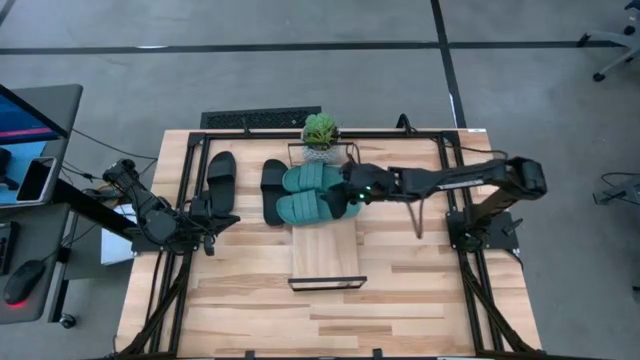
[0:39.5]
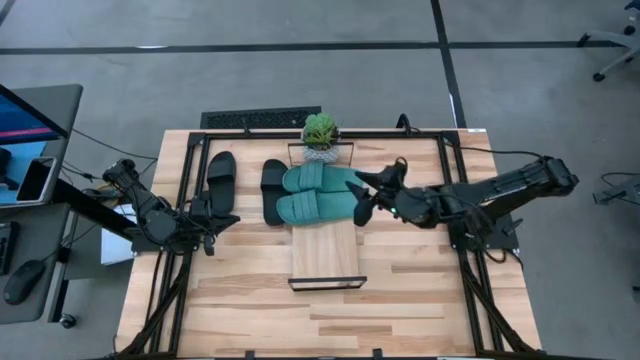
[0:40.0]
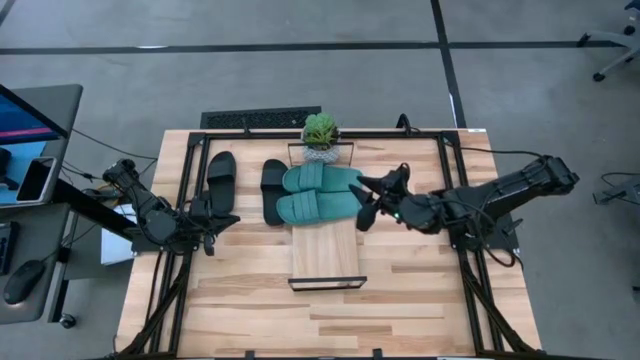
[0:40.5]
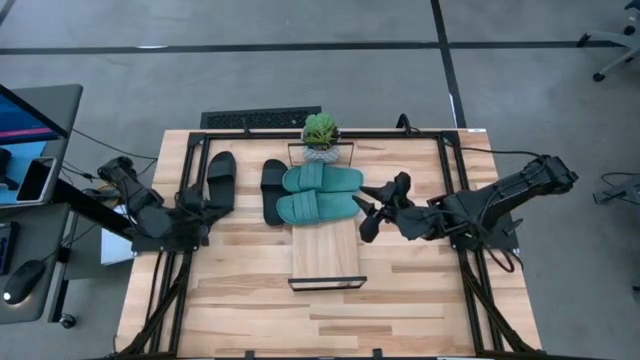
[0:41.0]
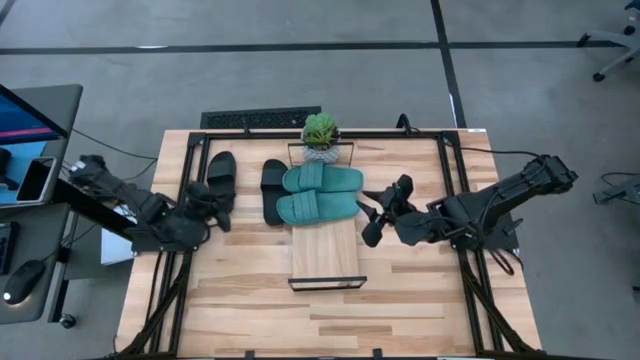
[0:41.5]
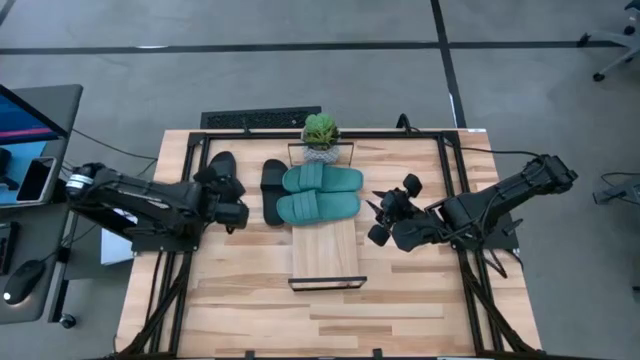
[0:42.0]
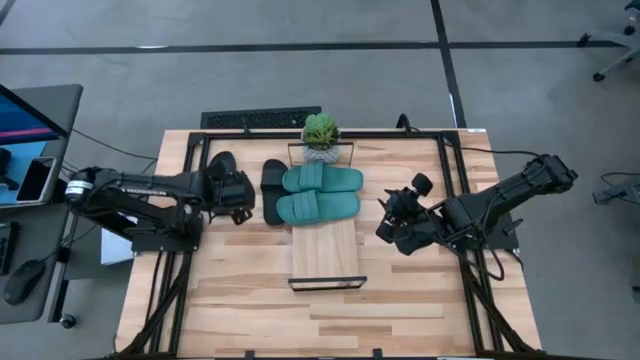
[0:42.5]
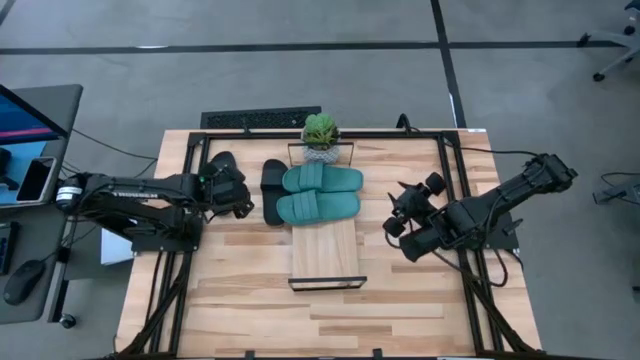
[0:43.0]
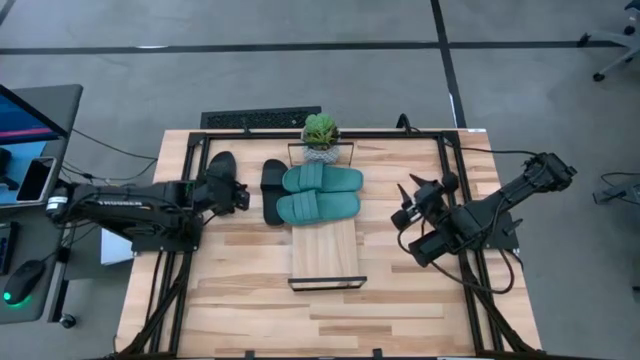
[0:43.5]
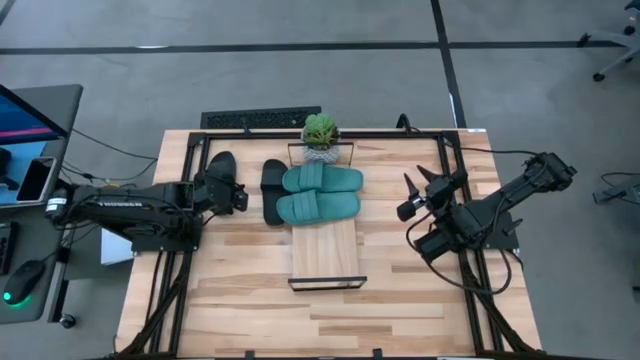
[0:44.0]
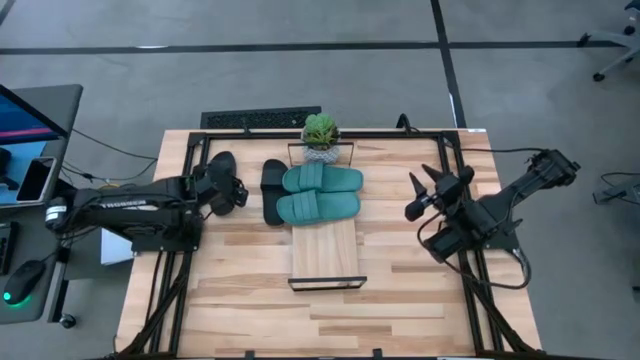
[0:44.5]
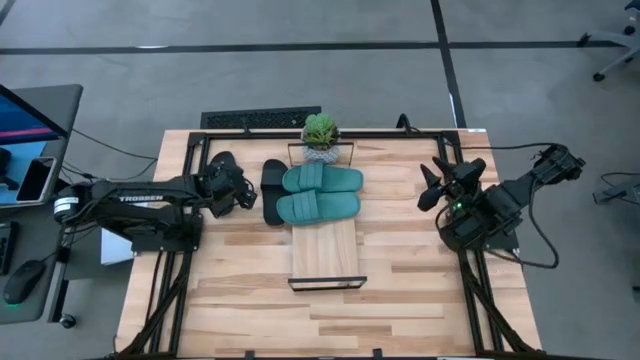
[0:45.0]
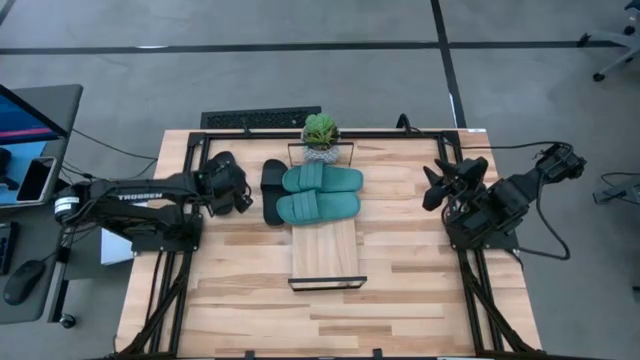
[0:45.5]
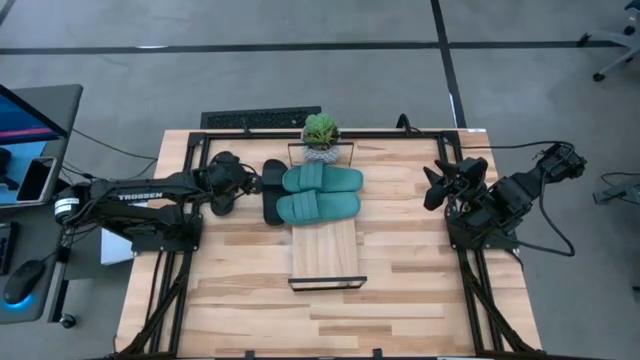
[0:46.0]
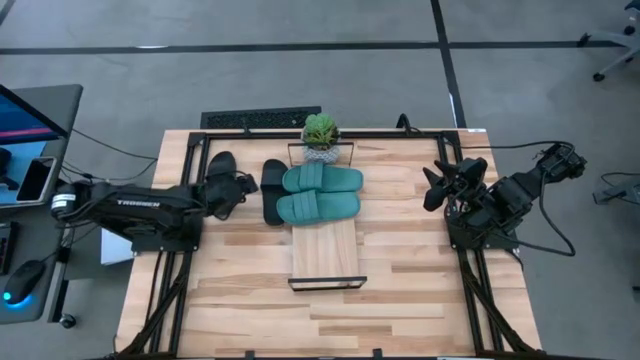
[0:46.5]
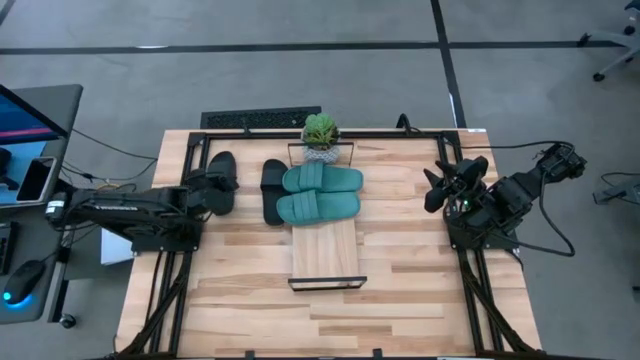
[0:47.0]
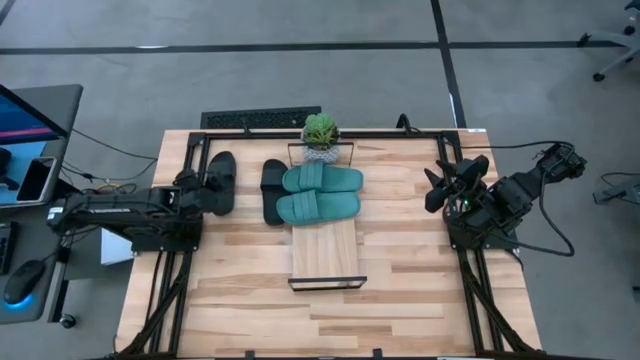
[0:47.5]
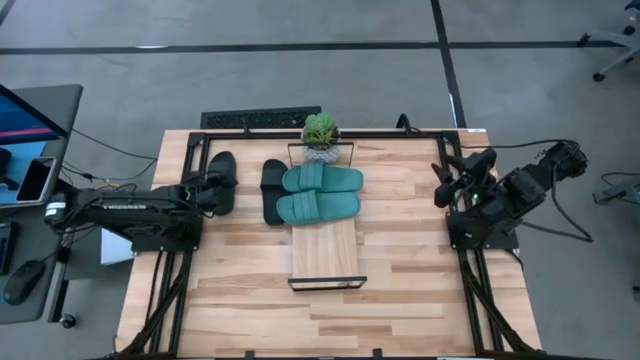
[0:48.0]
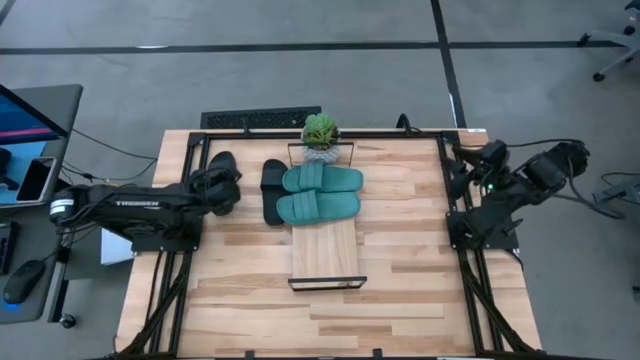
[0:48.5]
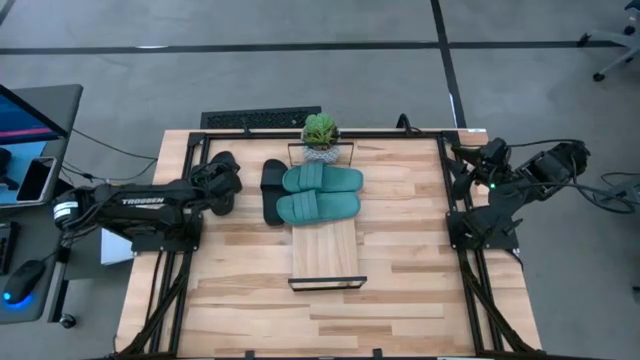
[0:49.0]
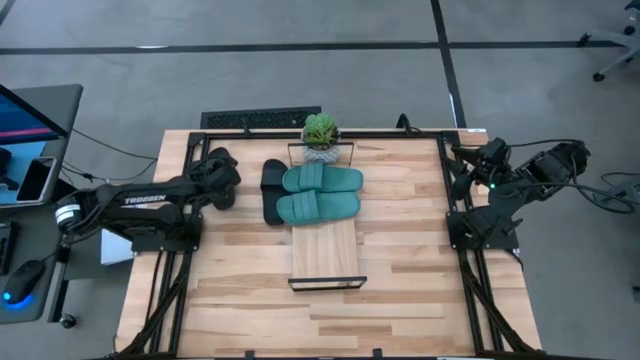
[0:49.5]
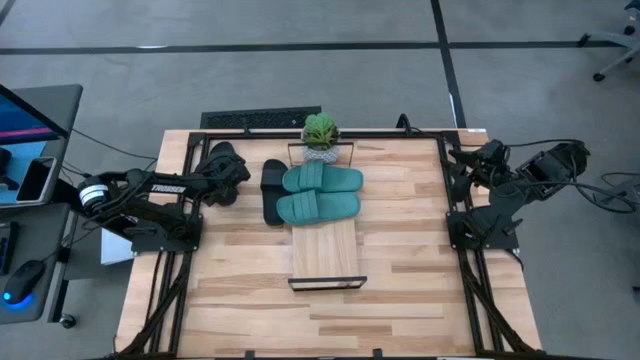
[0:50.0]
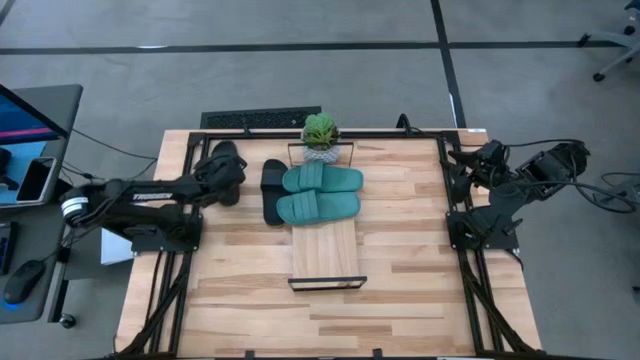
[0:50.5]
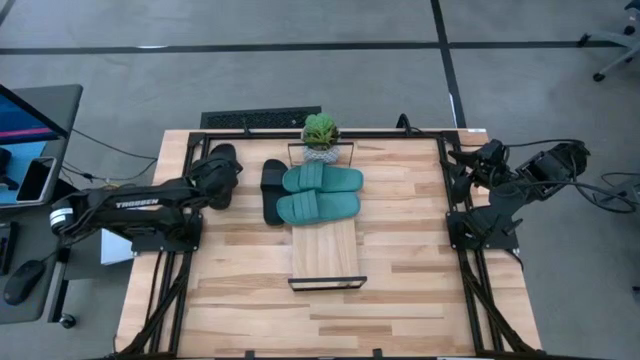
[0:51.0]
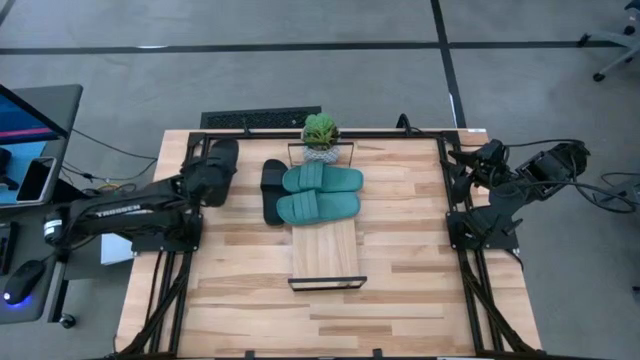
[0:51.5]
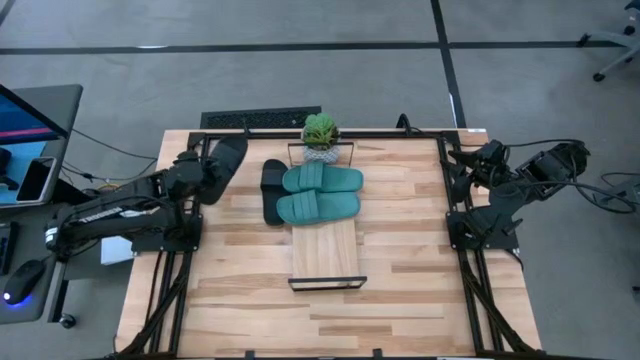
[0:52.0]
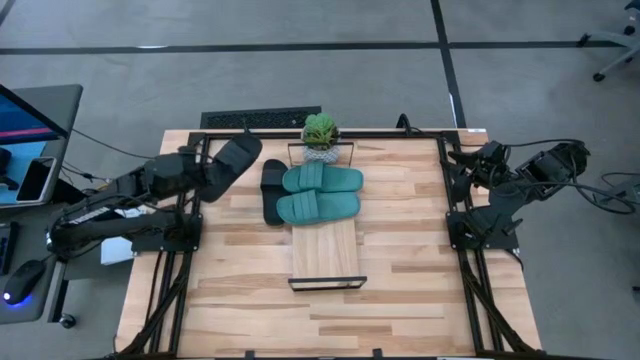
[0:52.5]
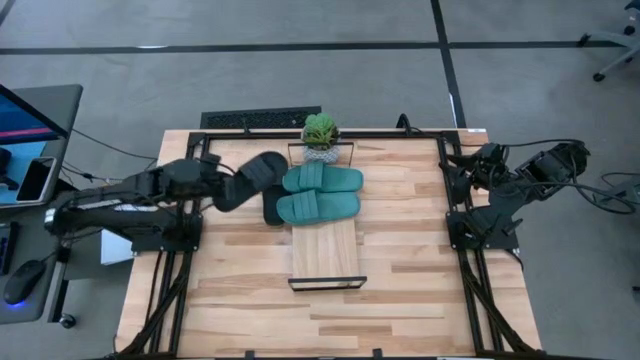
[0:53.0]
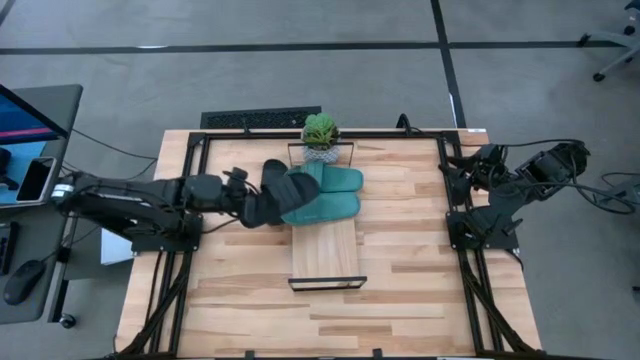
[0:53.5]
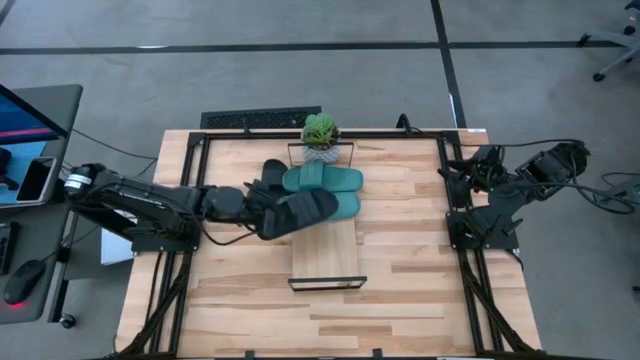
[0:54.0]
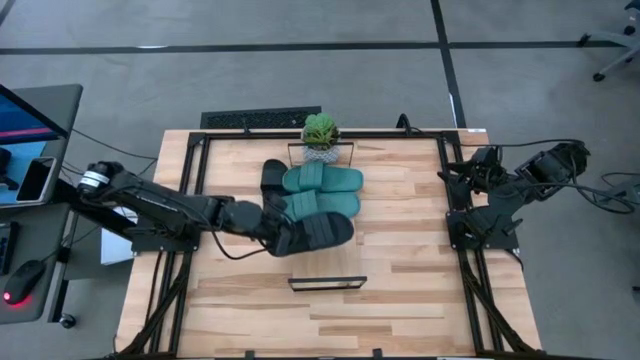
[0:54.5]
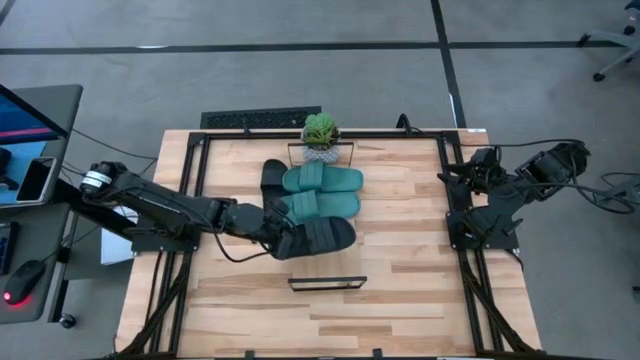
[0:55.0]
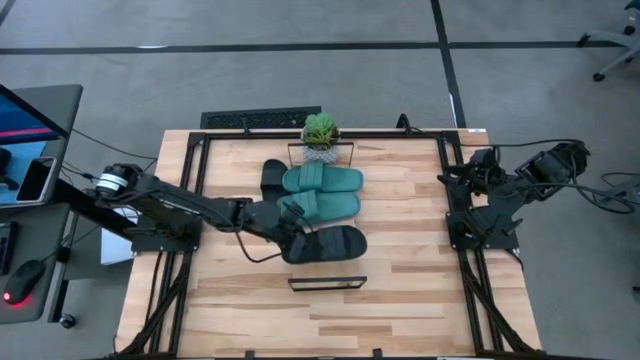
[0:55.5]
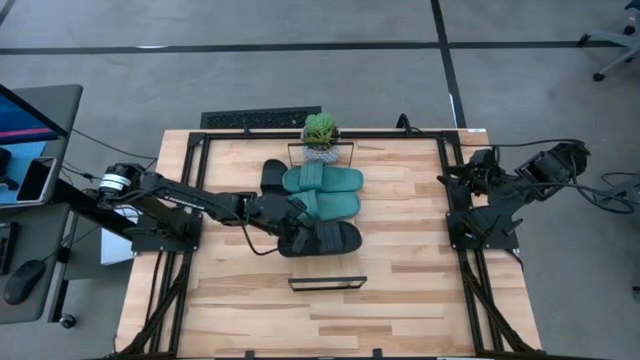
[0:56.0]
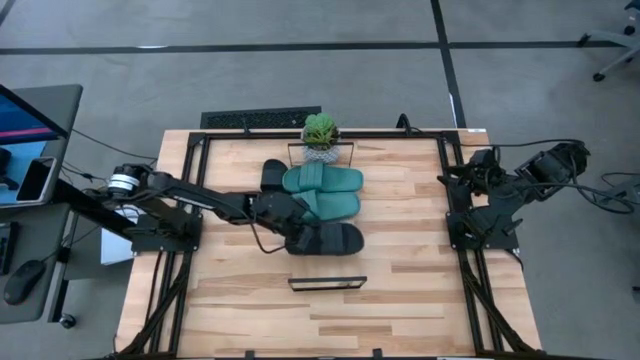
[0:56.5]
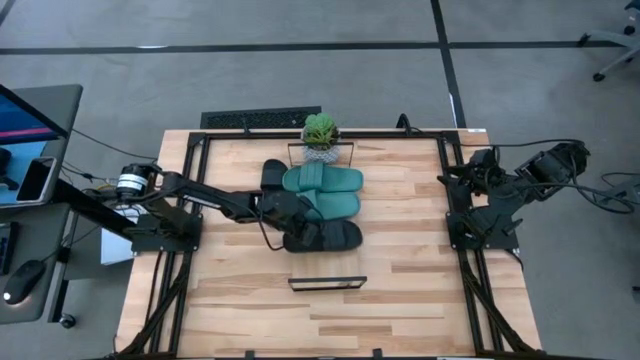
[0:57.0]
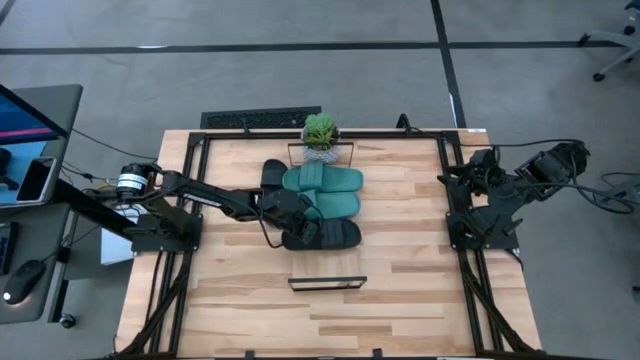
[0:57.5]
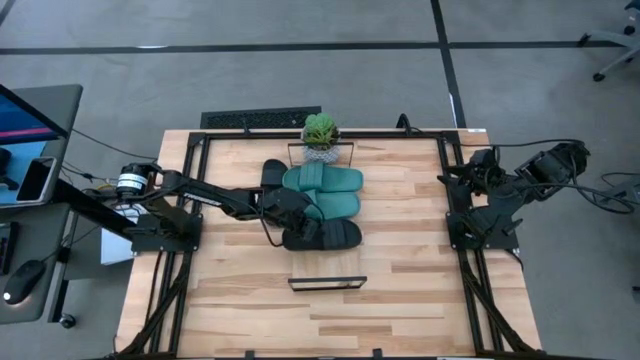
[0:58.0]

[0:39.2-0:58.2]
Task: Pick and place slides into the shelf
Put the left black slide on the shelf
